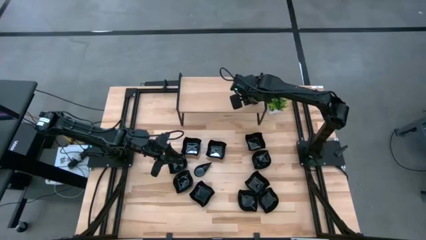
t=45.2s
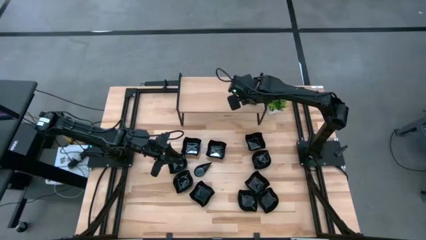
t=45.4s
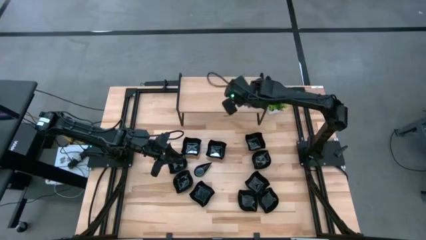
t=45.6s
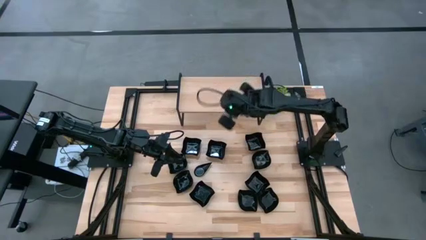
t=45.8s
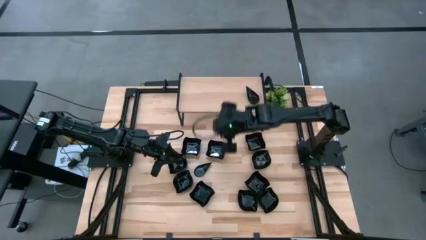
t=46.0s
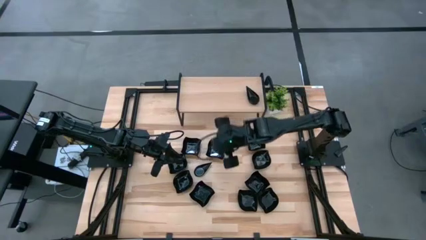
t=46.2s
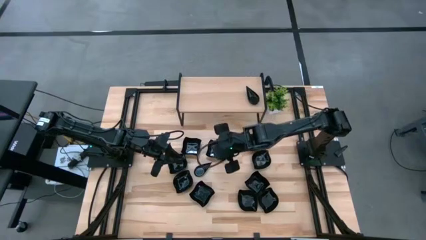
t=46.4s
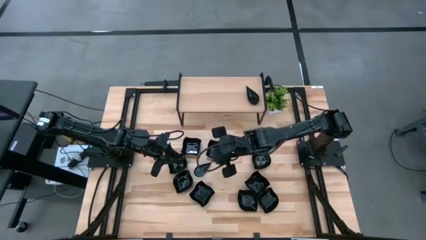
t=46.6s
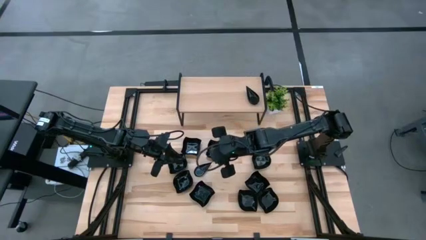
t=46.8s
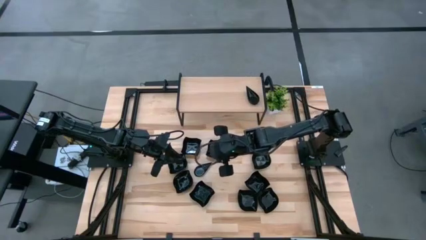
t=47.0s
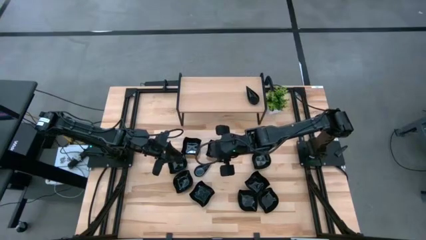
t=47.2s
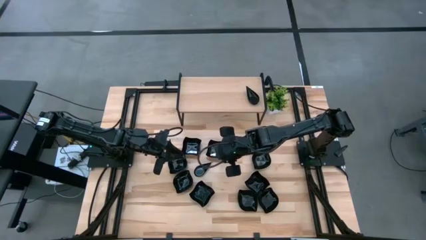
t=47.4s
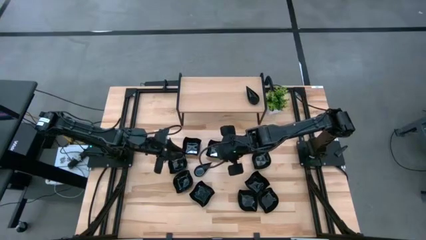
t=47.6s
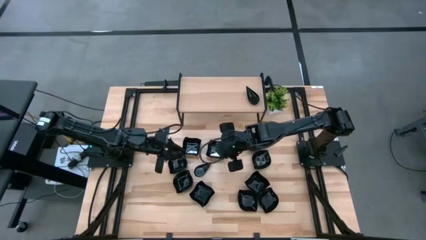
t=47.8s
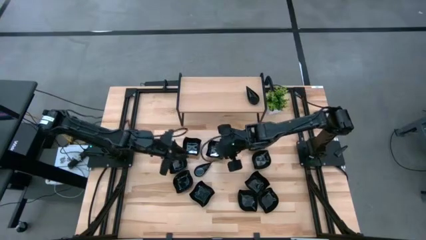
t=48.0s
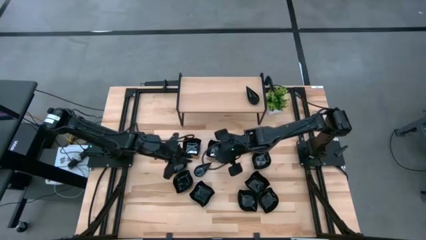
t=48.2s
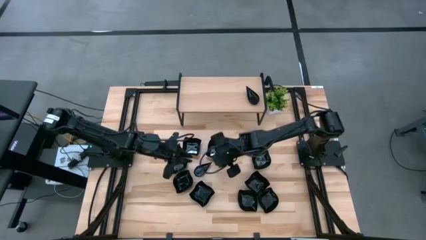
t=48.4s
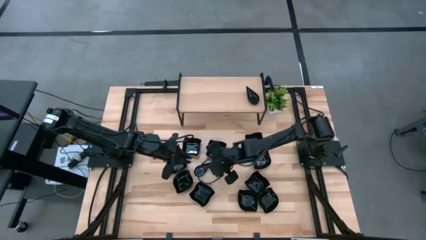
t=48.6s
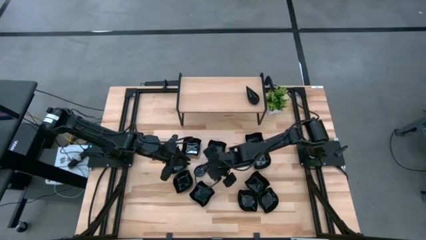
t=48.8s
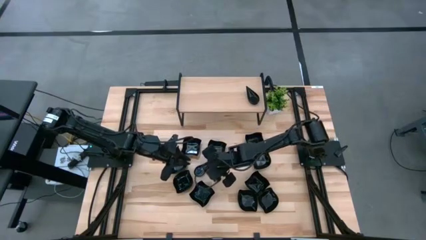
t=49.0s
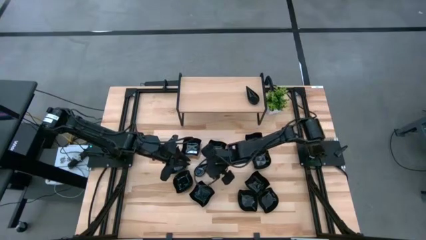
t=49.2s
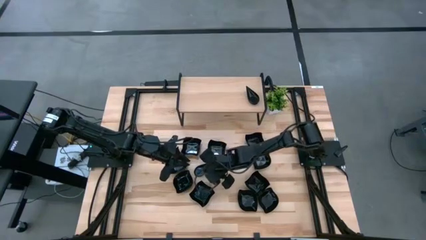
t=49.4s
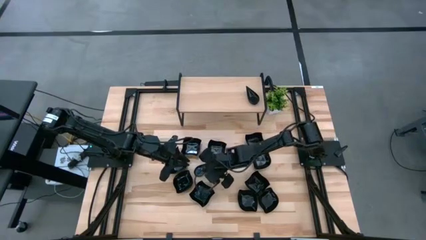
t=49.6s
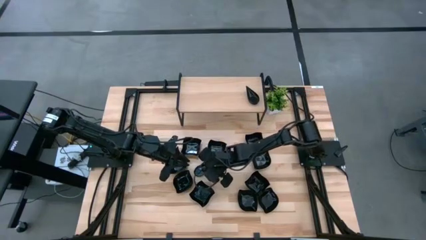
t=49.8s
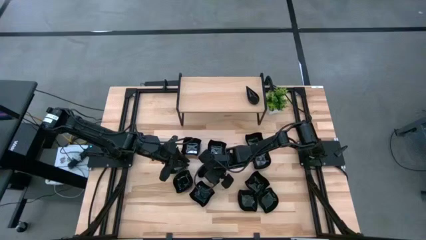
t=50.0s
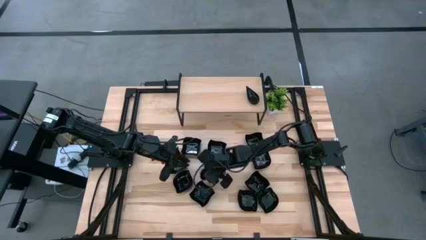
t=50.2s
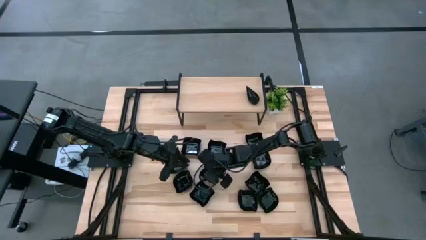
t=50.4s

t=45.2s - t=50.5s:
Task: Pick & Place Mini shaped plates
Stack the black drop shaped plate on top of the black drop shaped plate on the shelf

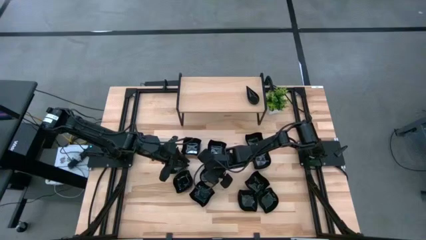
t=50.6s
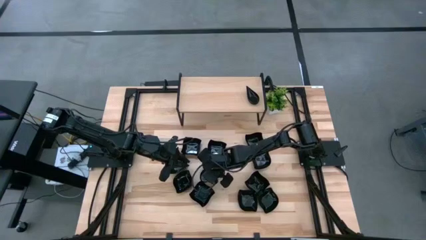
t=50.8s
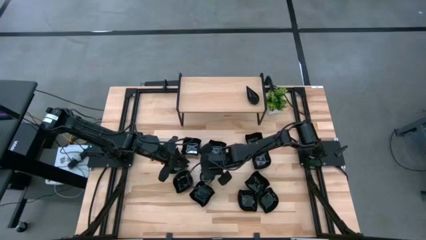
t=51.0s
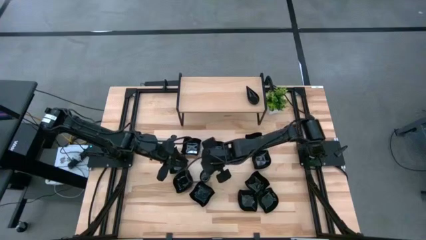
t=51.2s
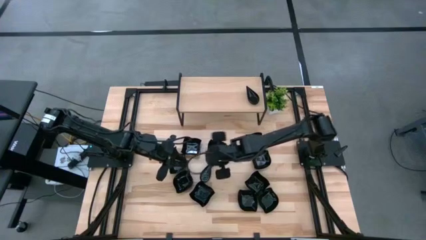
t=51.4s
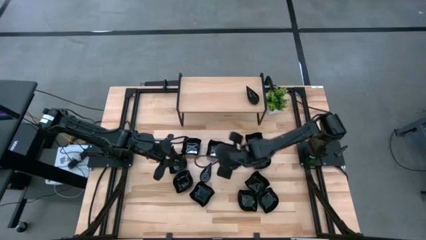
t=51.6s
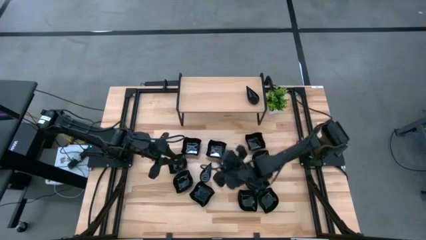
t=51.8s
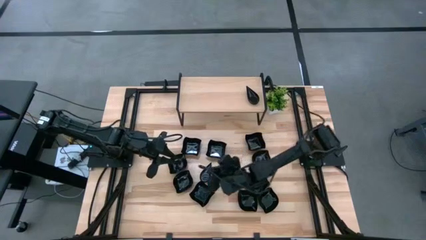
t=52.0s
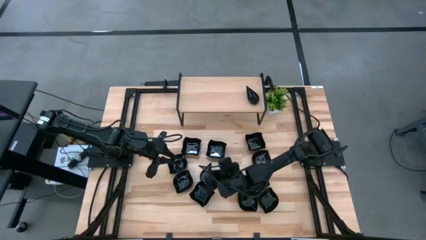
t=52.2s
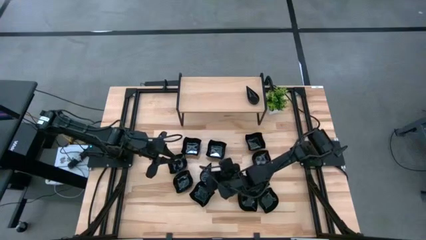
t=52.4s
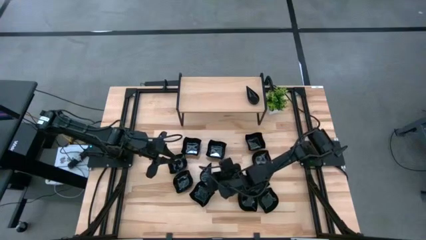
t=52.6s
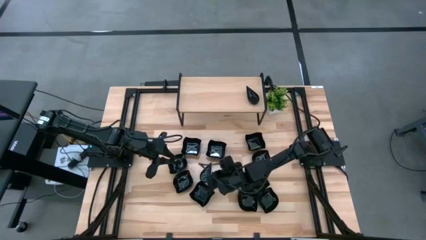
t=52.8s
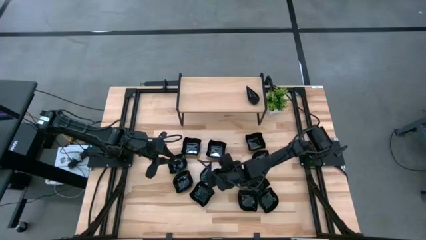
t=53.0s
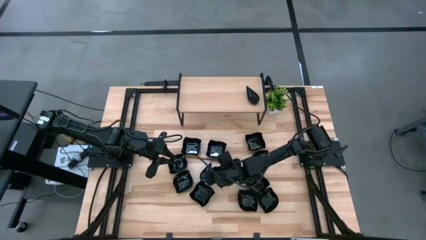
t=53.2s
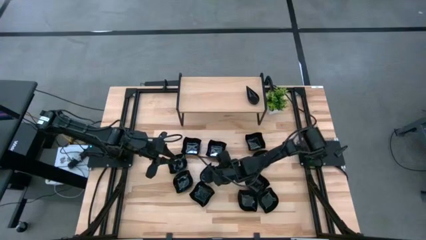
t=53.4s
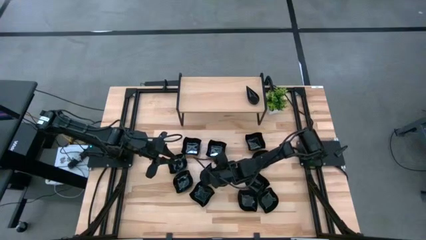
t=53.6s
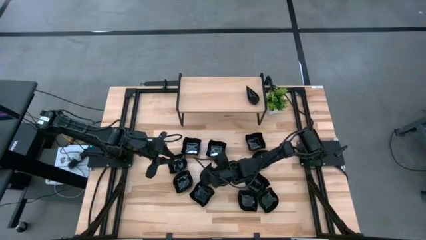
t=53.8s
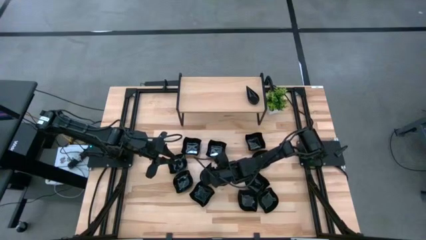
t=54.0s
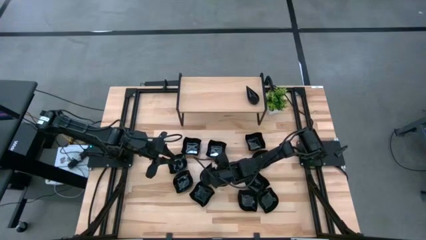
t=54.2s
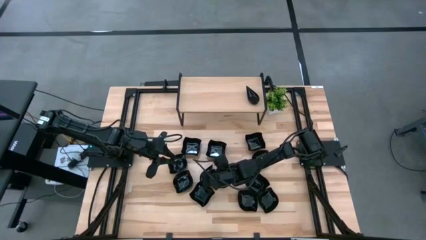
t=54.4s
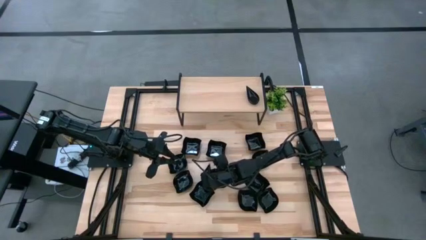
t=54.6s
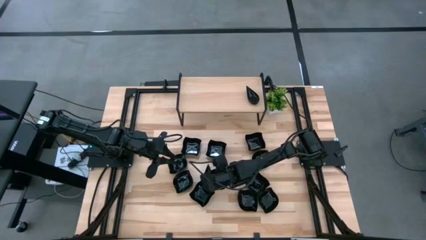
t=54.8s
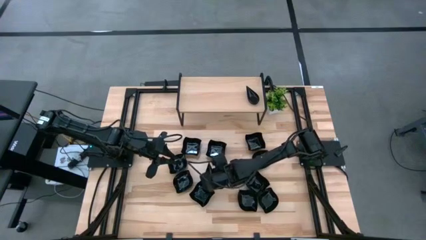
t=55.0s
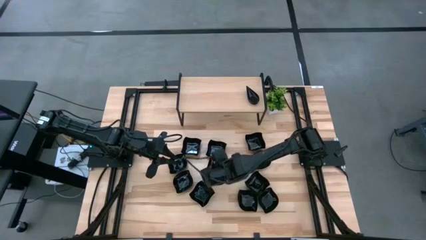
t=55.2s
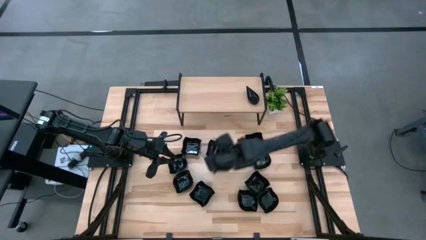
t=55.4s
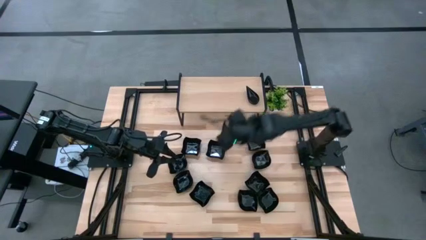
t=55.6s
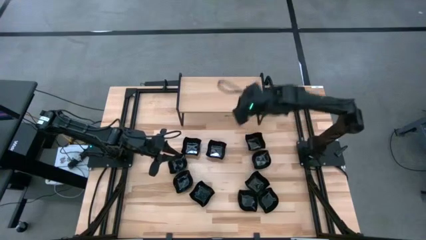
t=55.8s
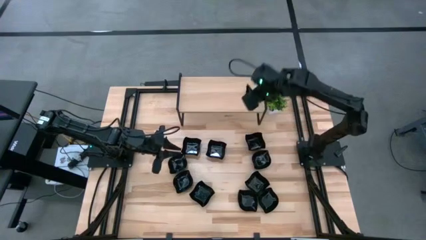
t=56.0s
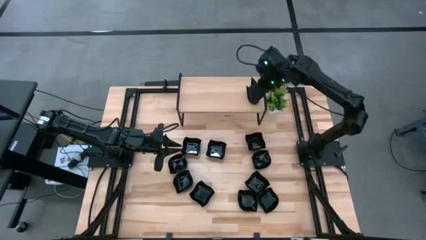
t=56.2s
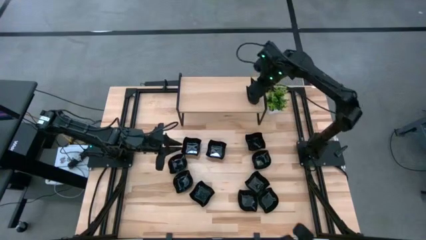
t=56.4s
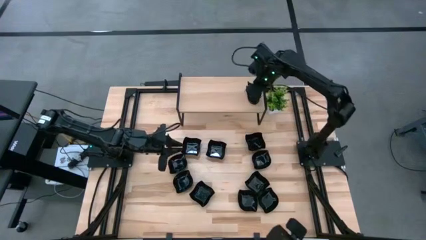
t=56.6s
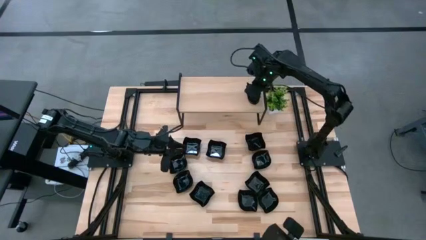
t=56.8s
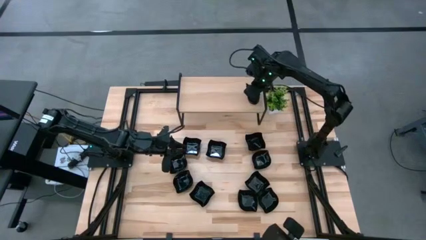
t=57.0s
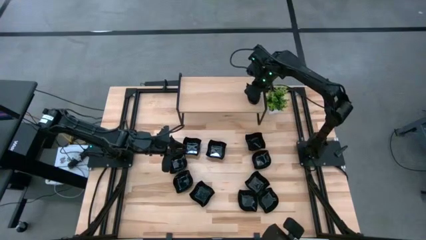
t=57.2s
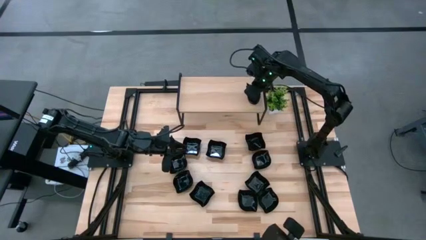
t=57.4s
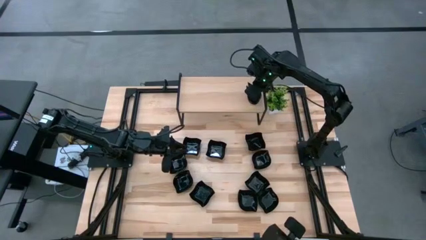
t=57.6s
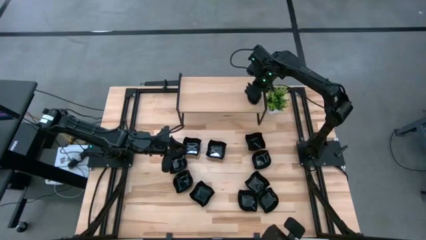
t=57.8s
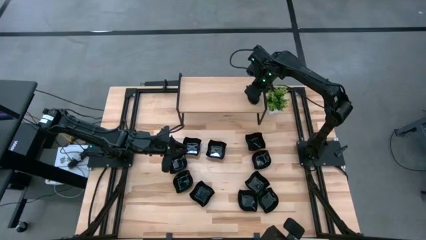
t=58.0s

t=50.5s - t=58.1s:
Stack the black drop shaped plate on top of the black drop shaped plate on the shelf
